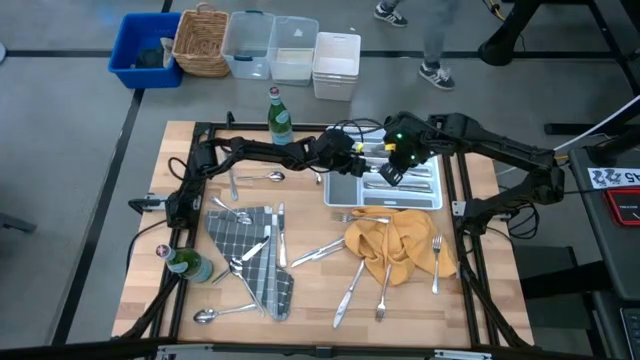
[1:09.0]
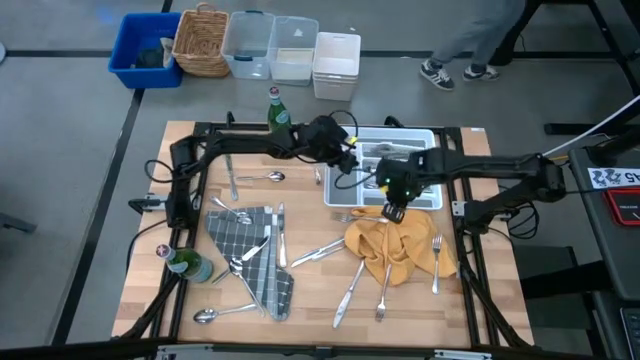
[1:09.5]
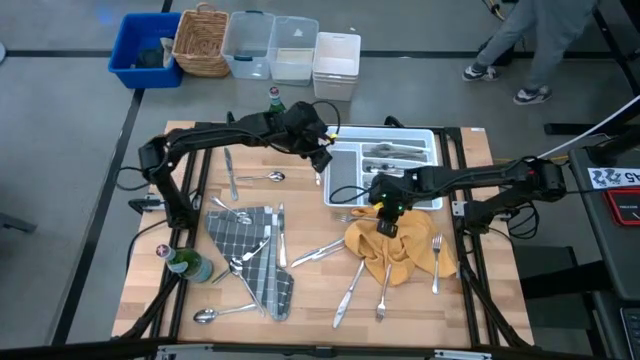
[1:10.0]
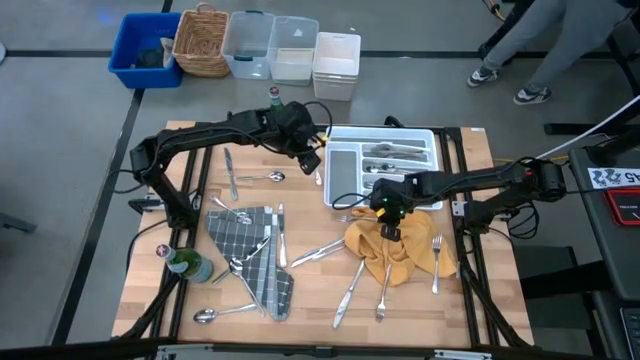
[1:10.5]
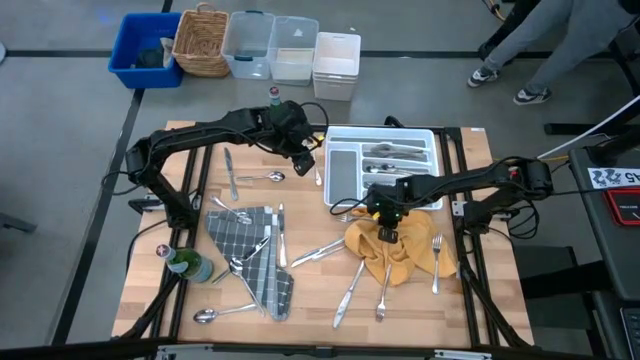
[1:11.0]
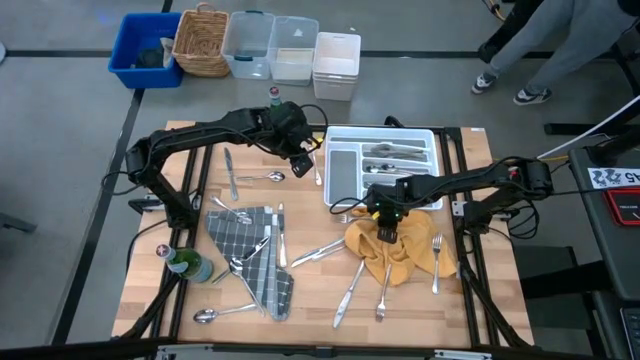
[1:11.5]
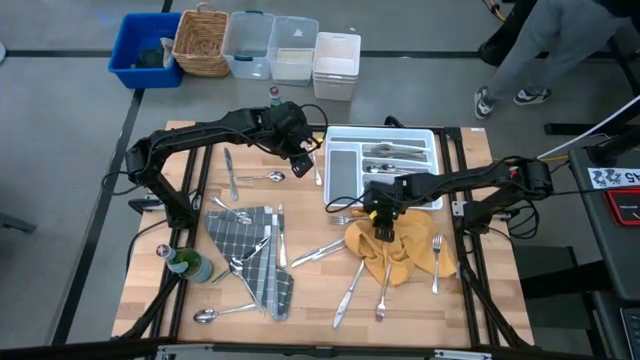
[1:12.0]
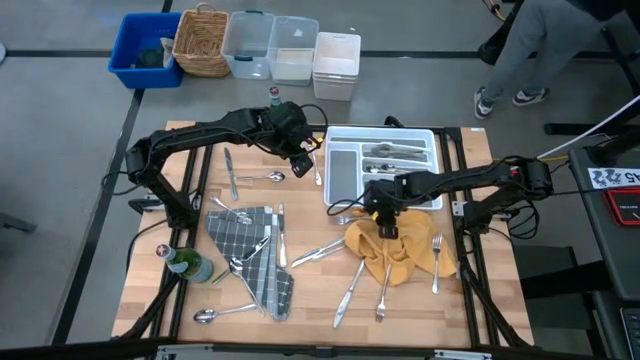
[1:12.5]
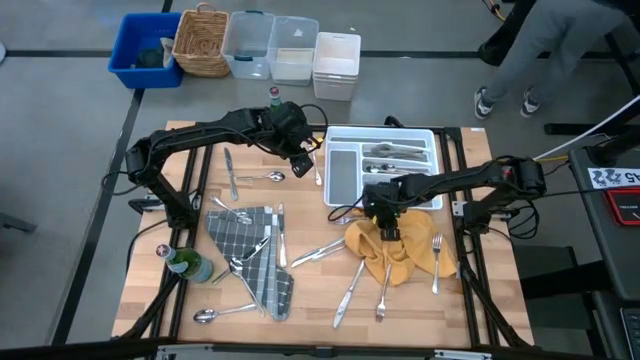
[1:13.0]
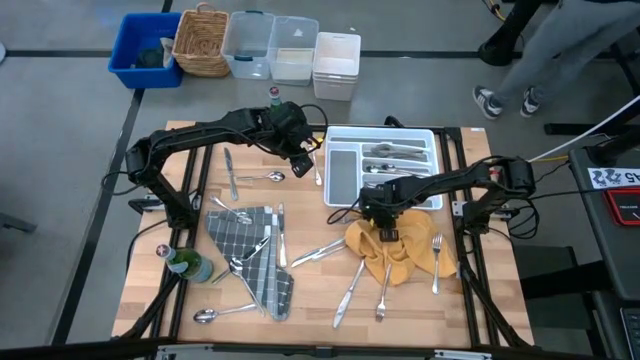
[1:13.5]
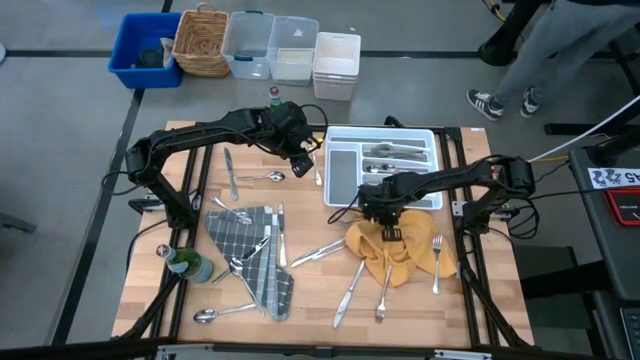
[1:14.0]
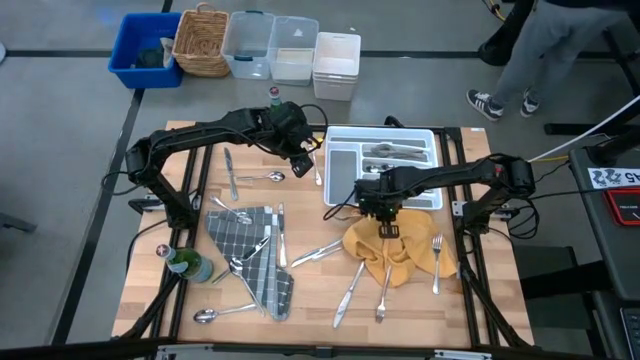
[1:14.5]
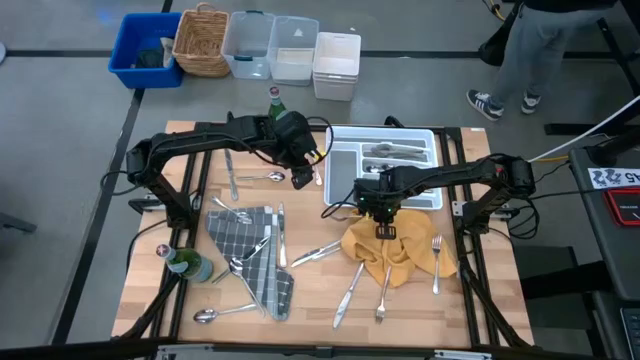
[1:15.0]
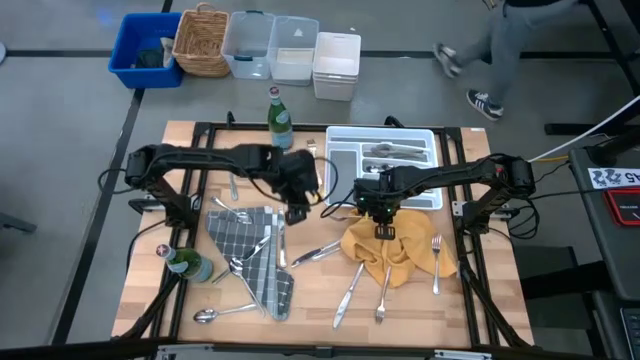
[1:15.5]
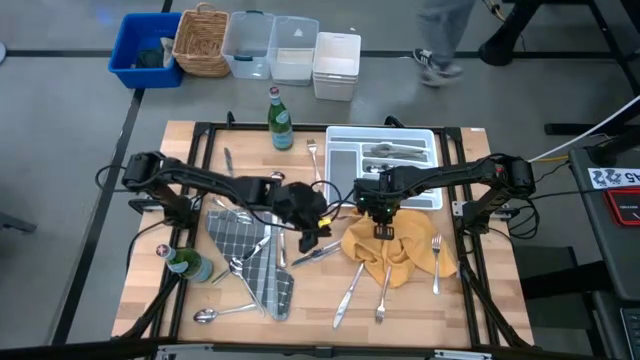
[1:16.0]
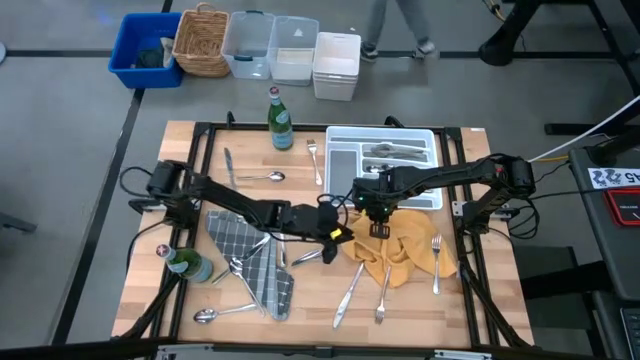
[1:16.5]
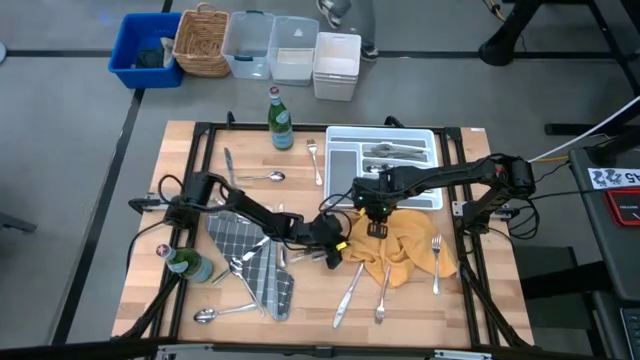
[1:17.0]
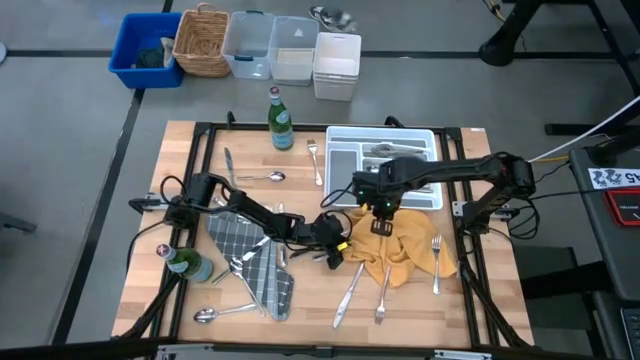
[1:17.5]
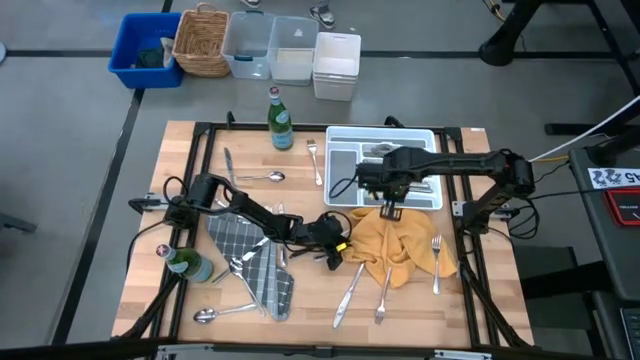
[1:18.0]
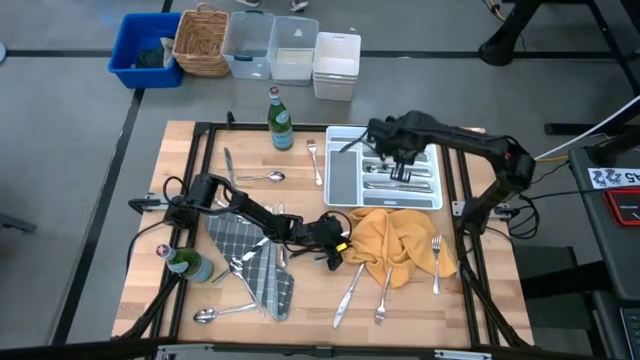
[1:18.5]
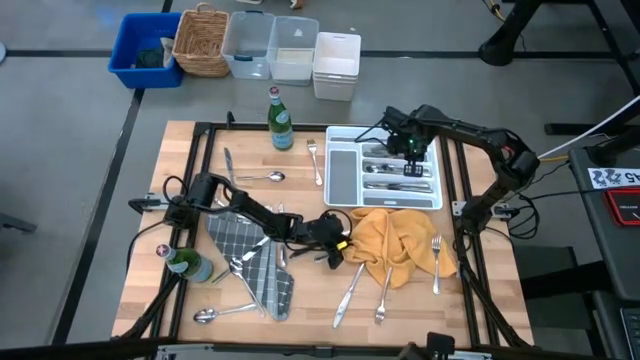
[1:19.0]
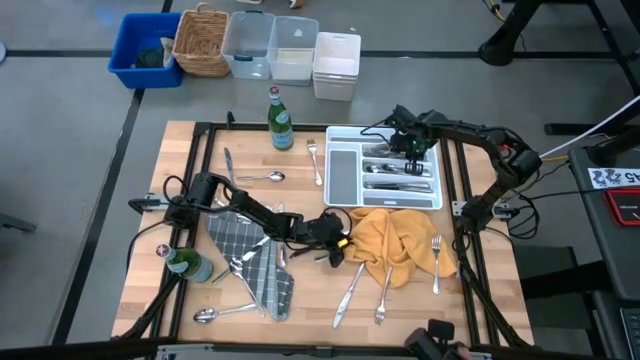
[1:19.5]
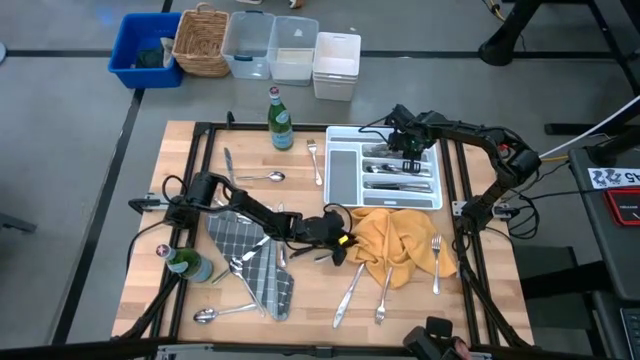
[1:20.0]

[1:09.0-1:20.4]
Put the silver fork into the cutlery tray

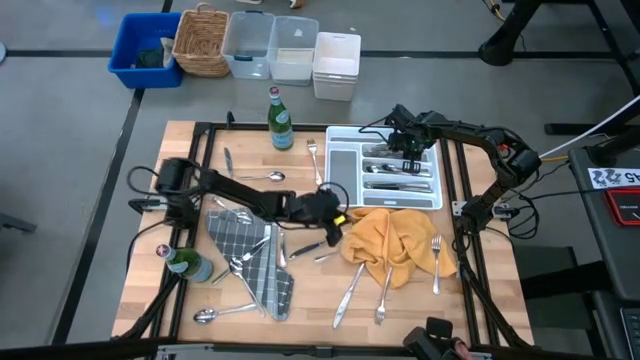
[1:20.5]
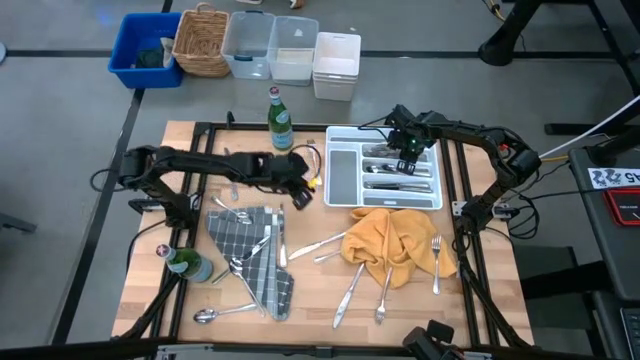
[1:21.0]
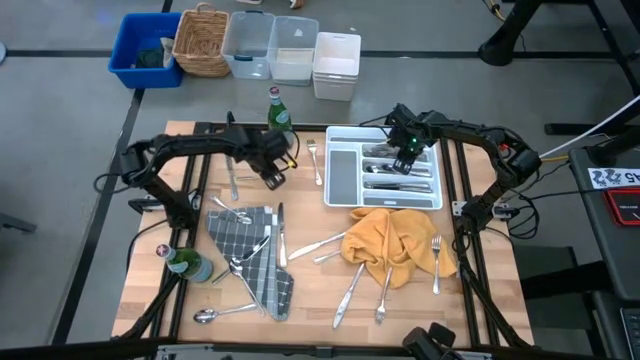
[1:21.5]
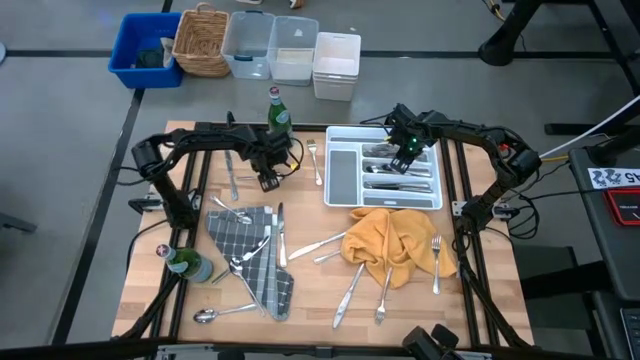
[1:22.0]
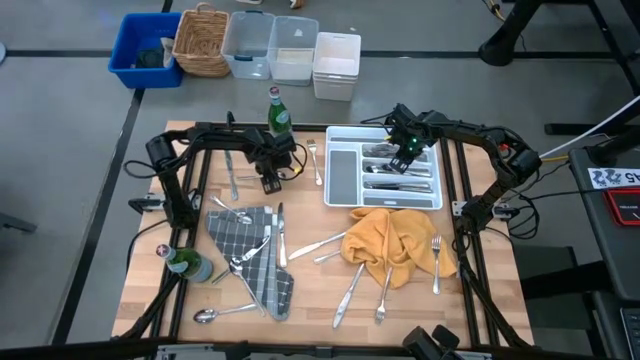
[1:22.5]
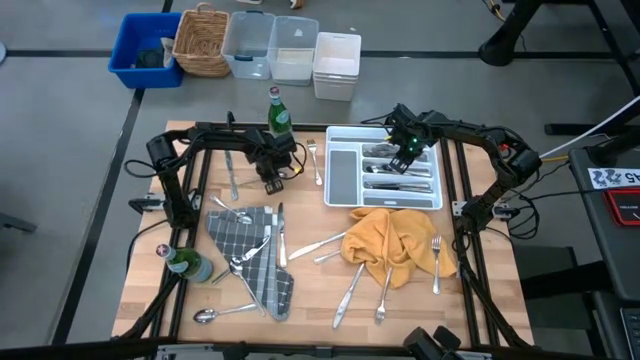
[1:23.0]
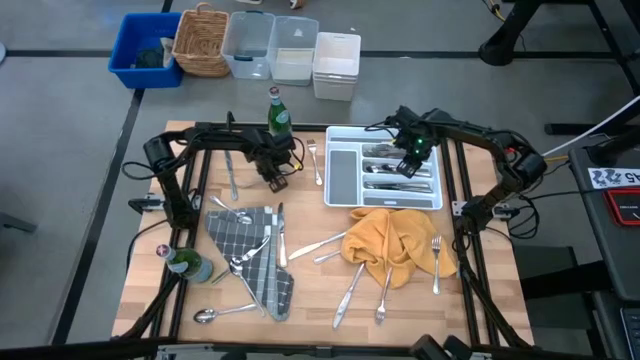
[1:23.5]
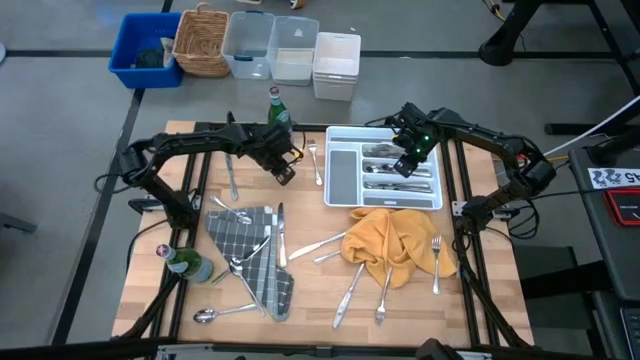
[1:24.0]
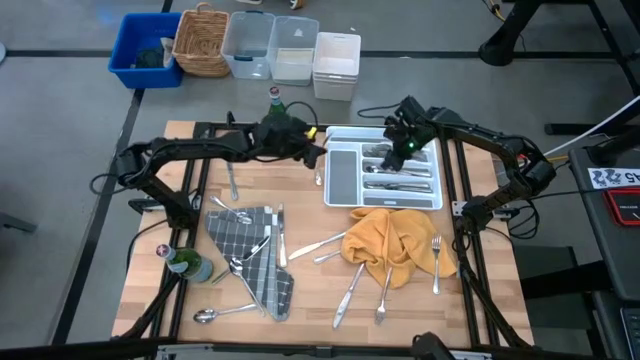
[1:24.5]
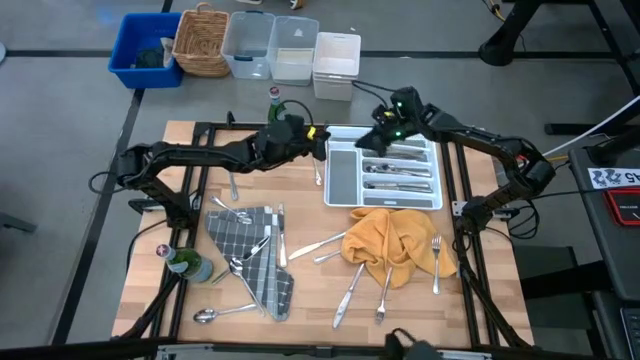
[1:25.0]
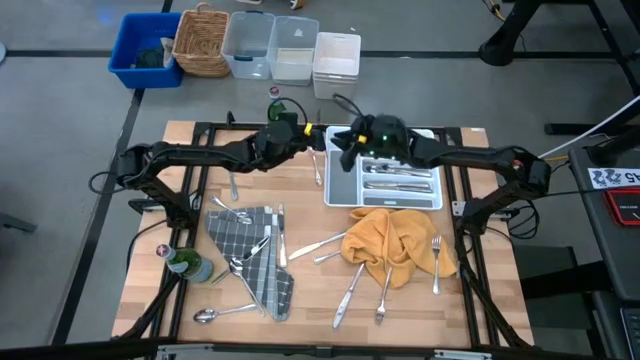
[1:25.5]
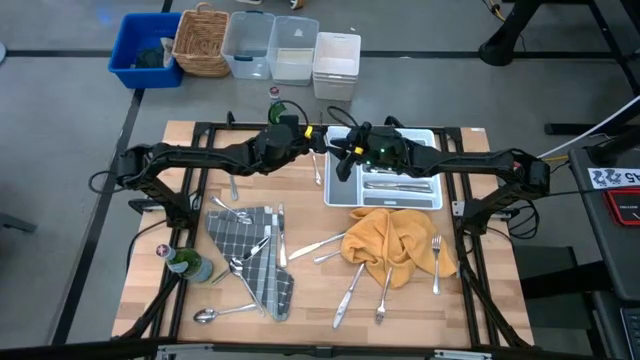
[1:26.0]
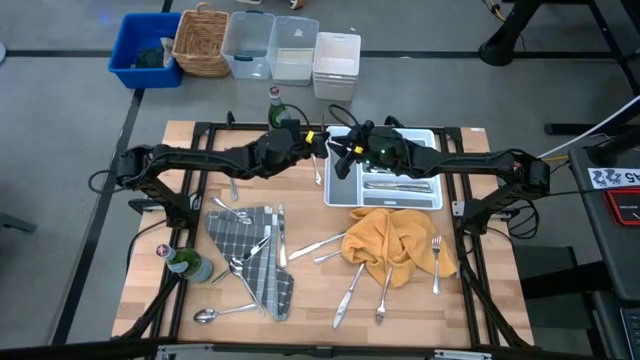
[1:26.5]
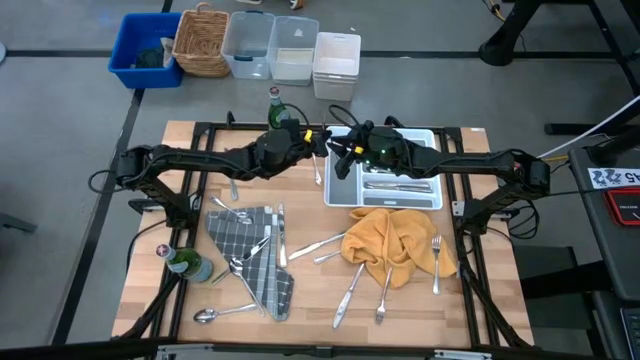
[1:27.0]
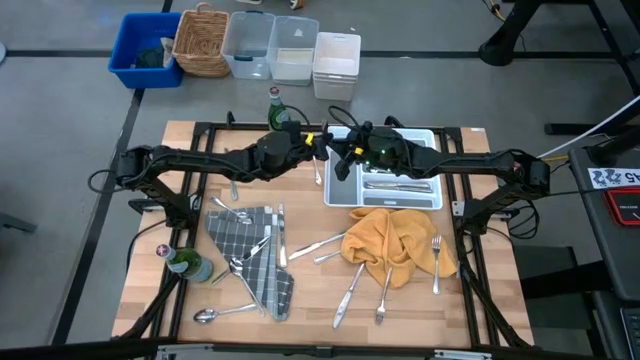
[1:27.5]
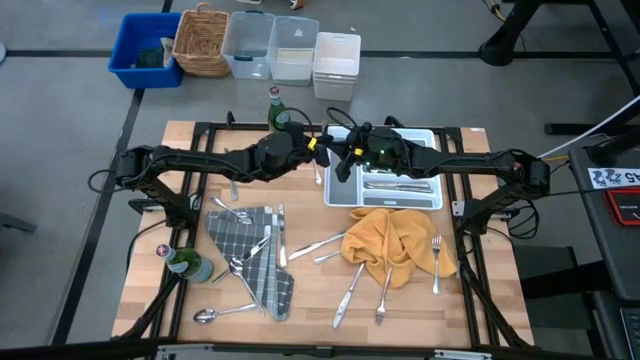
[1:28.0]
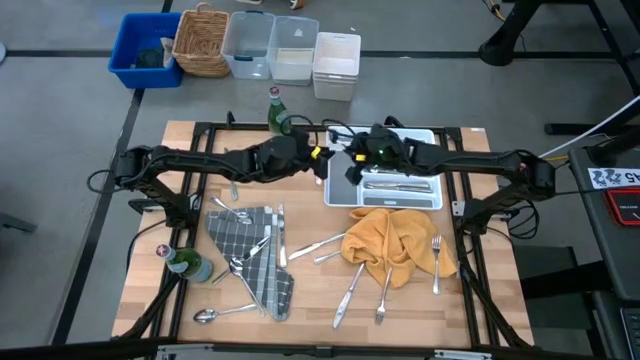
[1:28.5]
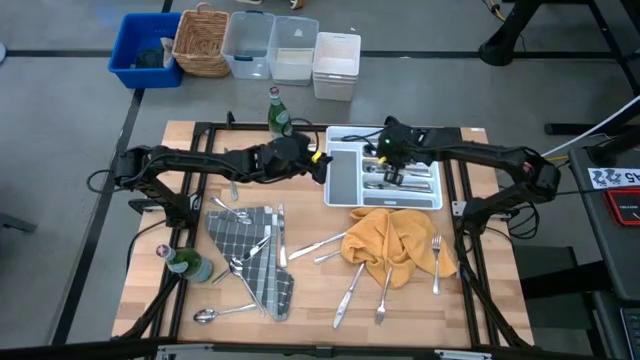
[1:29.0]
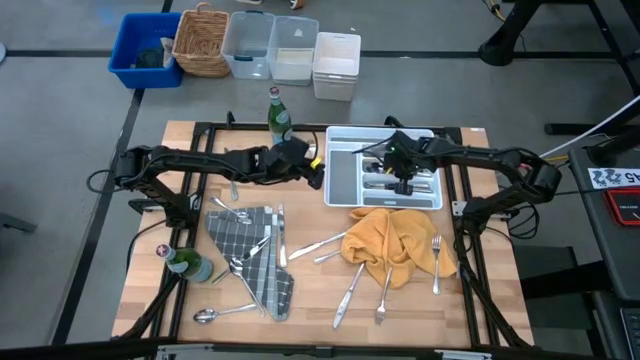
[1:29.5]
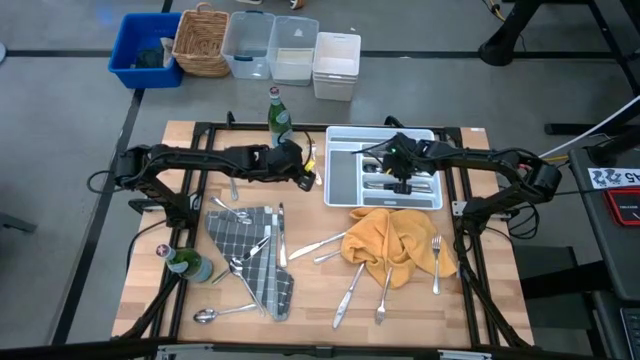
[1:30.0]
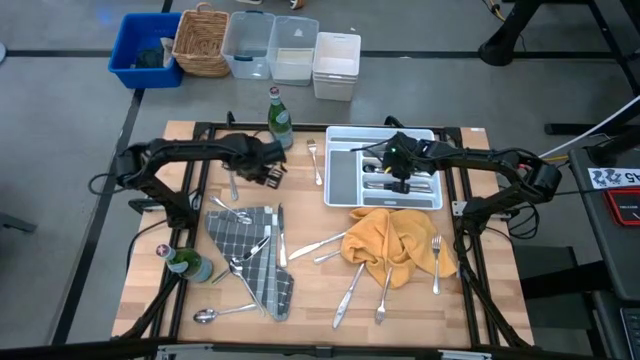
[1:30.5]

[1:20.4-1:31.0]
Put the silver spoon into the cutlery tray
